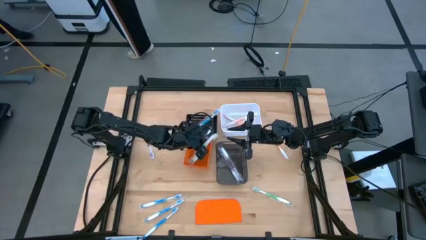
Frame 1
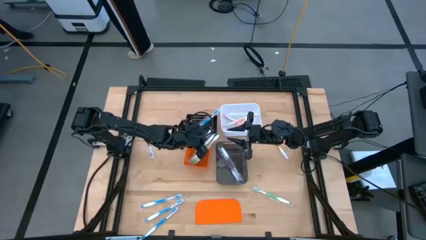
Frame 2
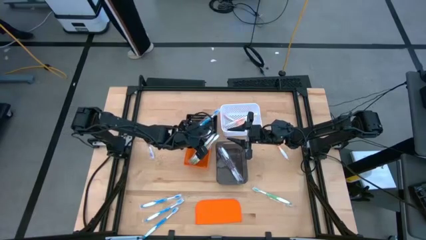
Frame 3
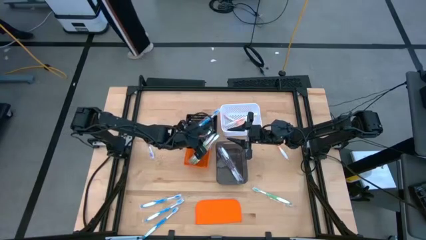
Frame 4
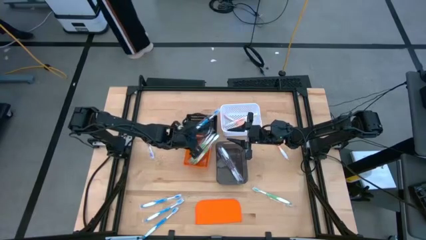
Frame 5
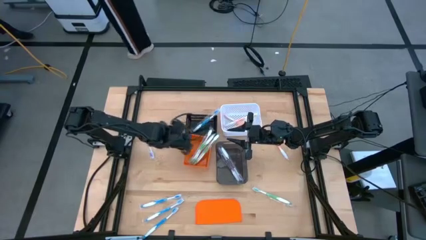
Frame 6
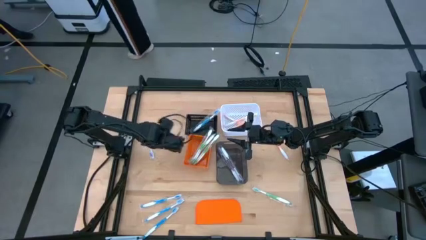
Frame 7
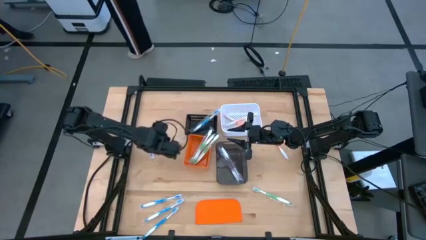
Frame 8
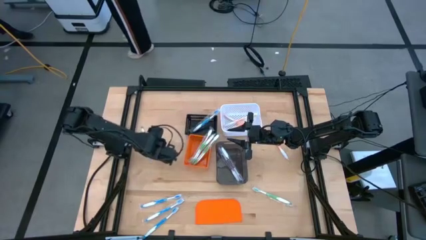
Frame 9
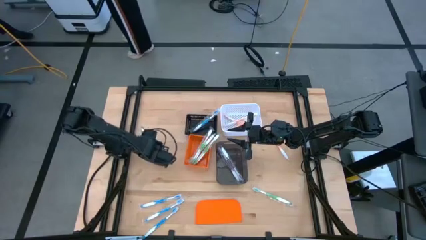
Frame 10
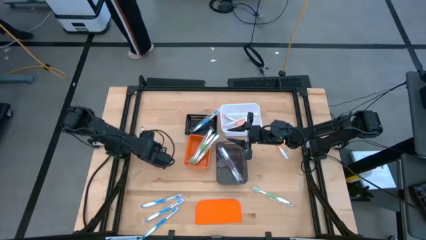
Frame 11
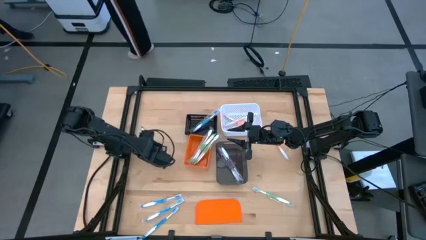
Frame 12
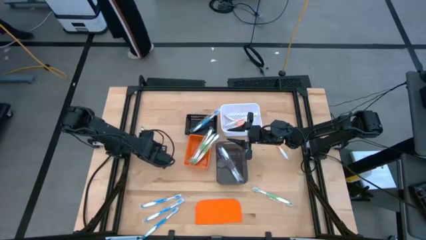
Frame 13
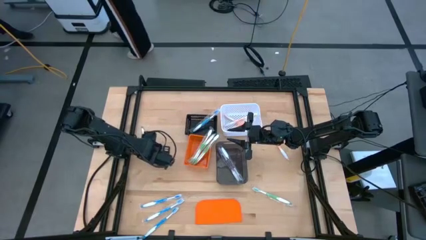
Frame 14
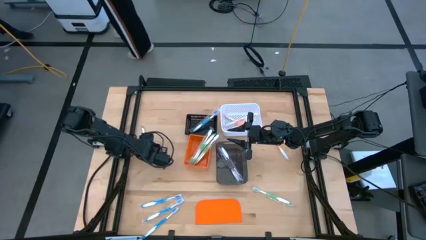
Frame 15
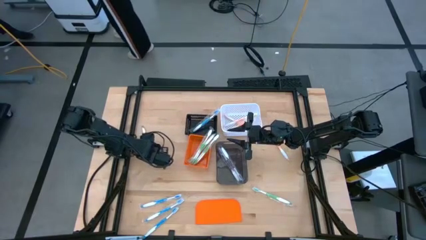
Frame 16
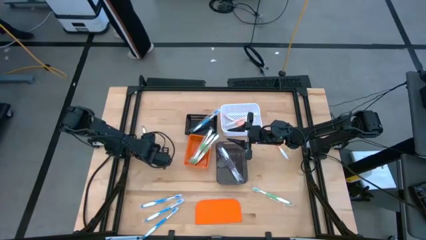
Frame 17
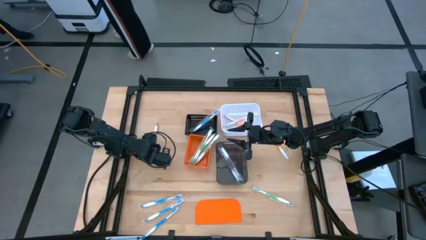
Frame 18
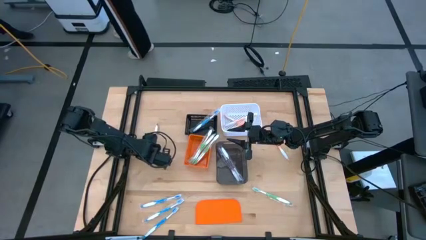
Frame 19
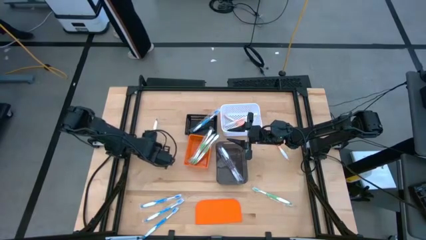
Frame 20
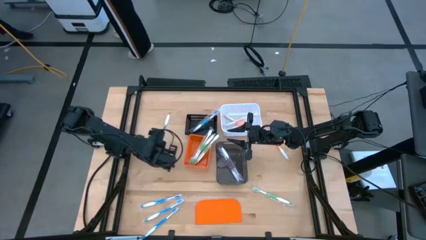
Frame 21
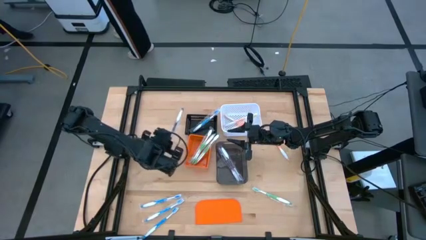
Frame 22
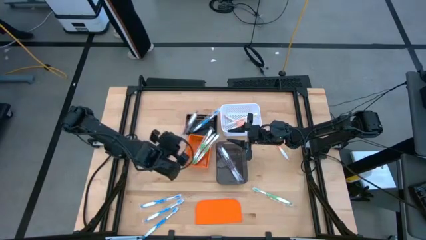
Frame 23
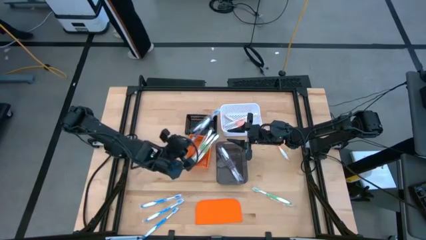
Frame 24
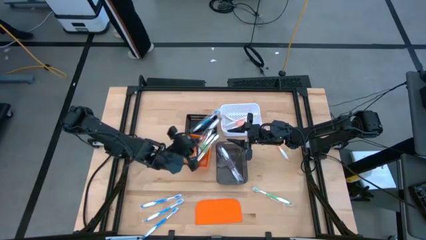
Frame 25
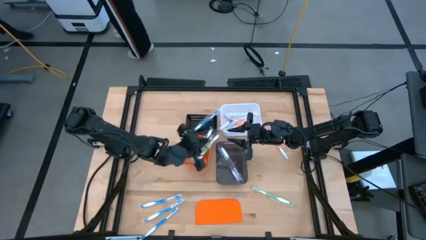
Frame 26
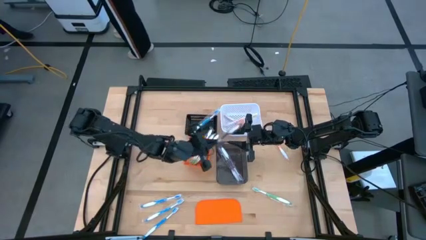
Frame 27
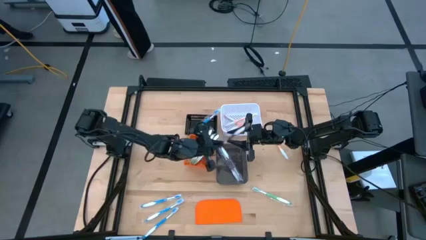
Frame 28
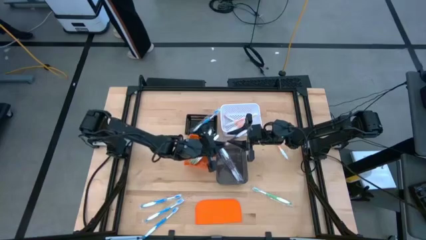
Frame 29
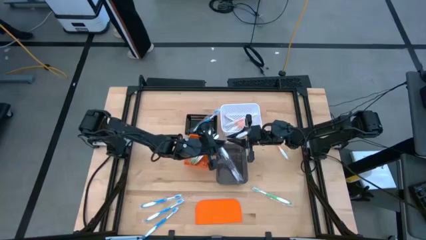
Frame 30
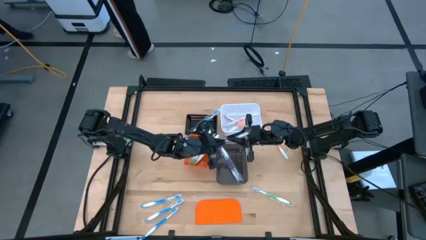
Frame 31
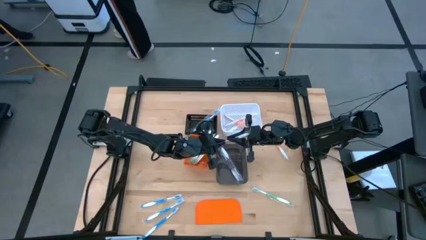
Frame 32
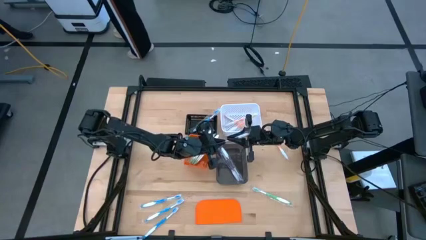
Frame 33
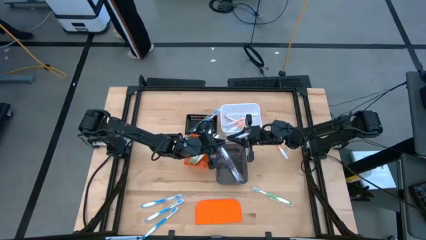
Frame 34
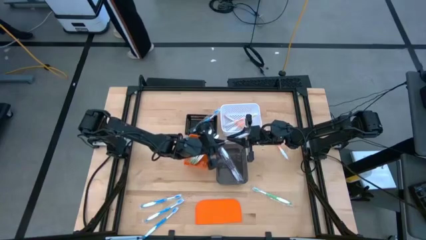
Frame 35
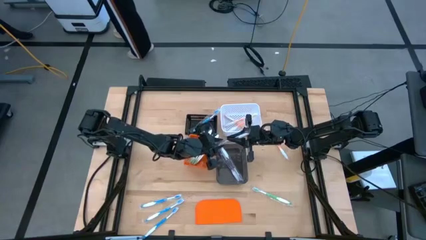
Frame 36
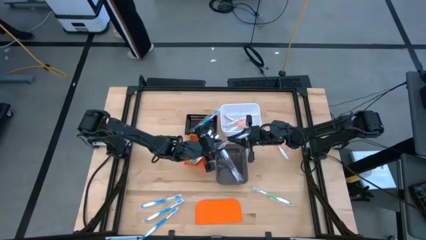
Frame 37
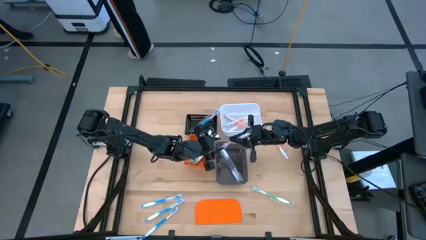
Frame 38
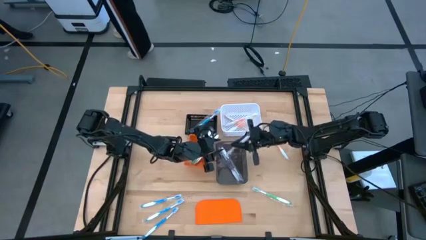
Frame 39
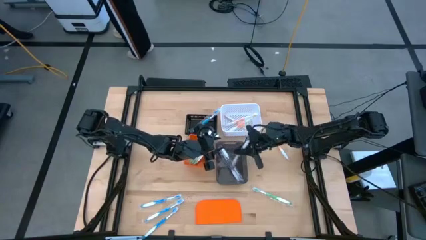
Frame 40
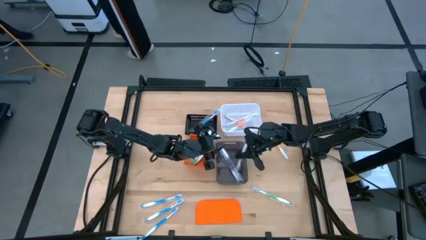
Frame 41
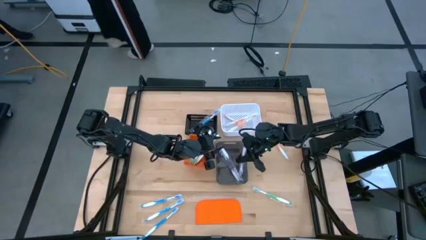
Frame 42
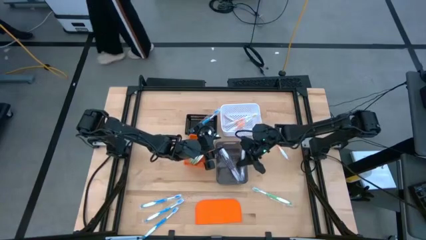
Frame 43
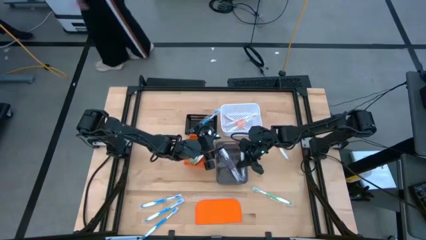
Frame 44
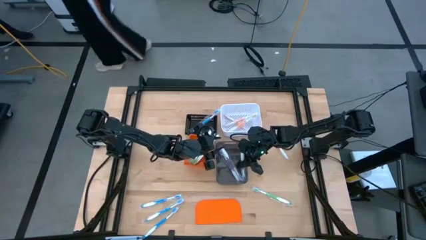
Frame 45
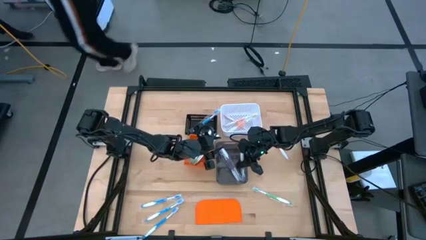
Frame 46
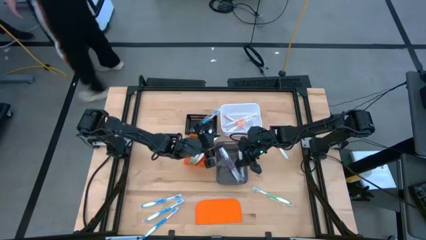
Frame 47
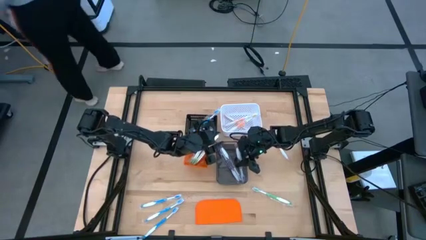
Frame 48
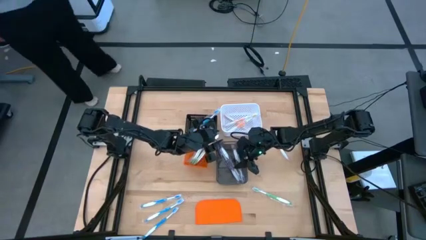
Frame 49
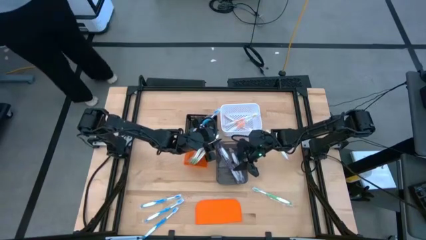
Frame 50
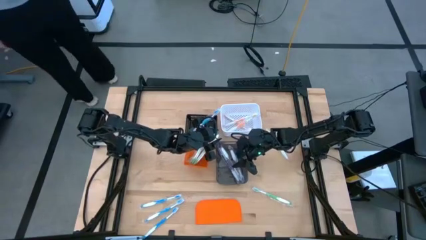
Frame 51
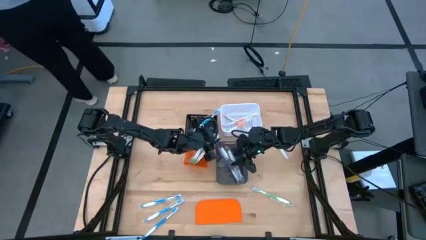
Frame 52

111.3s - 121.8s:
Task: Pick & Place Toothbrushes
Put the violet toothbrush into the transparent bin

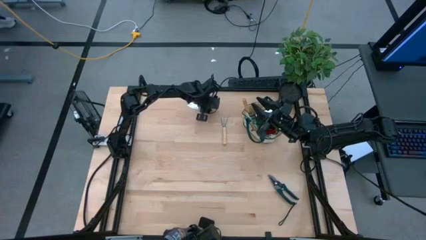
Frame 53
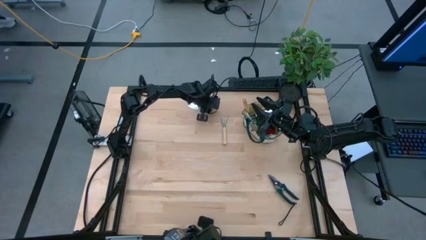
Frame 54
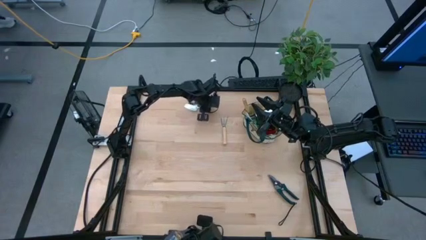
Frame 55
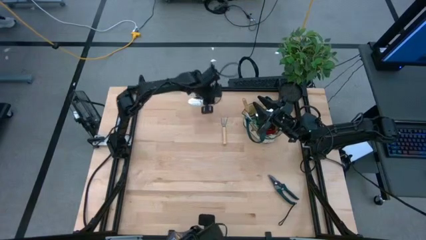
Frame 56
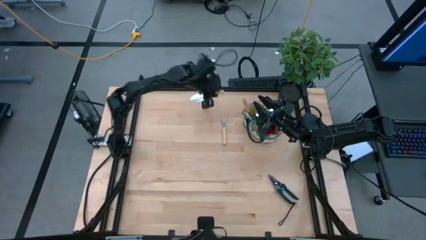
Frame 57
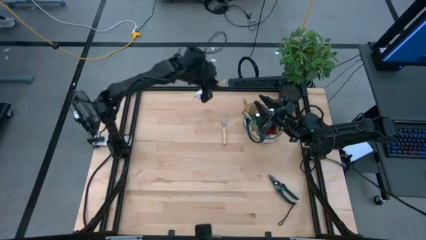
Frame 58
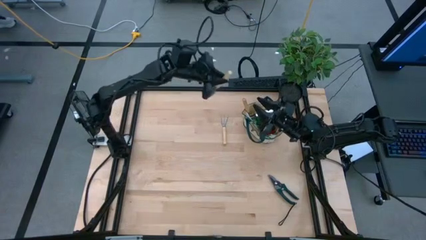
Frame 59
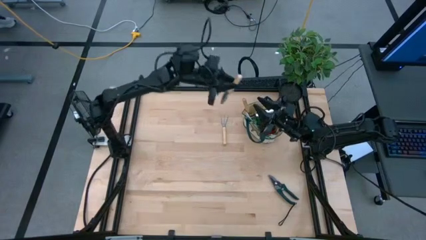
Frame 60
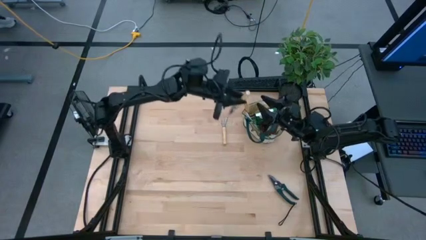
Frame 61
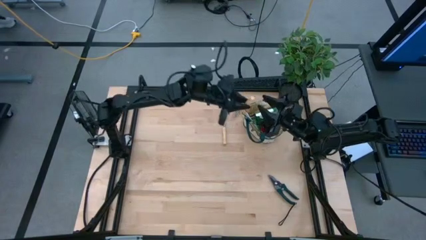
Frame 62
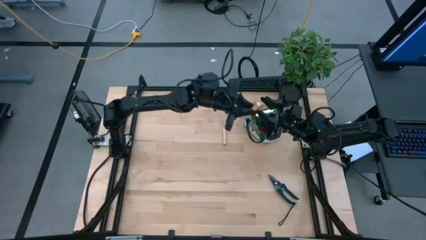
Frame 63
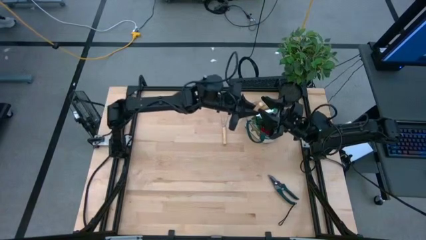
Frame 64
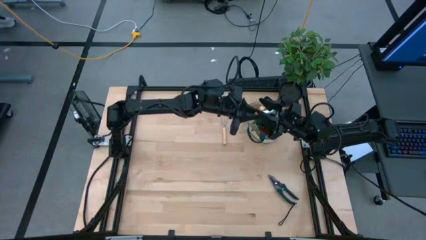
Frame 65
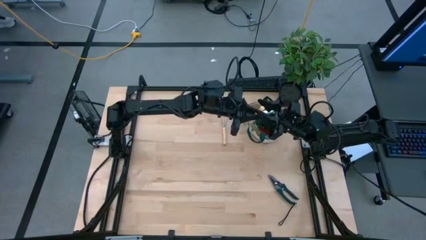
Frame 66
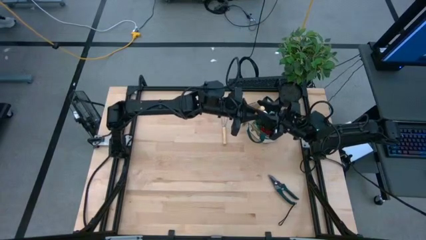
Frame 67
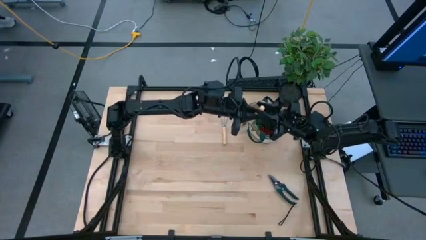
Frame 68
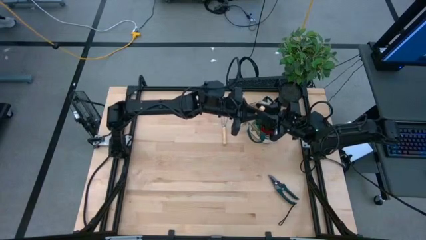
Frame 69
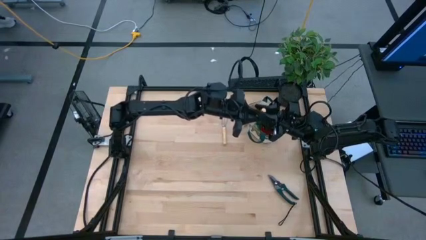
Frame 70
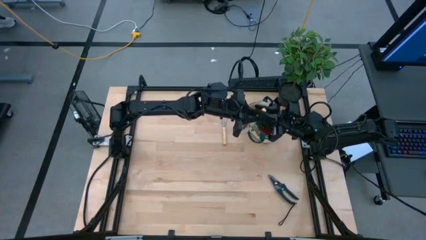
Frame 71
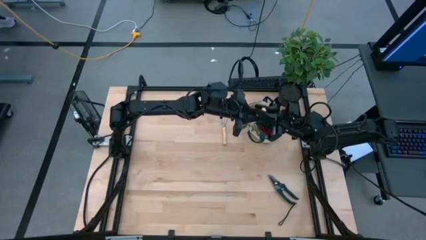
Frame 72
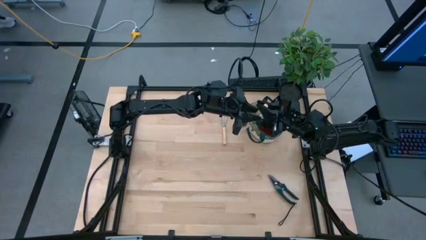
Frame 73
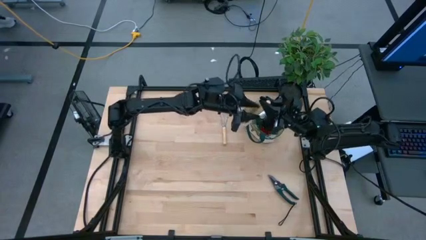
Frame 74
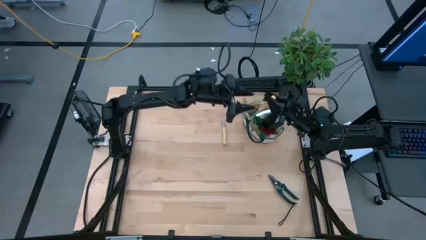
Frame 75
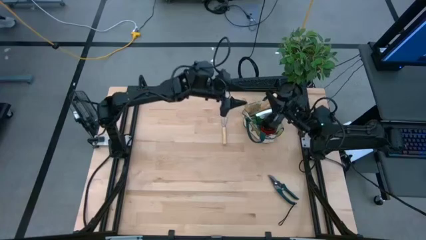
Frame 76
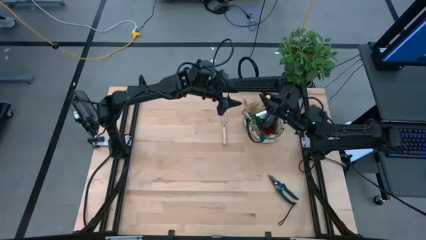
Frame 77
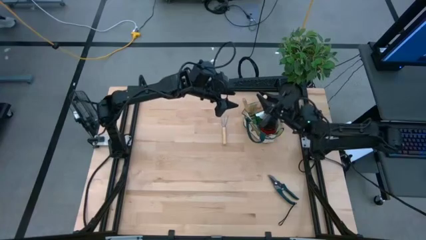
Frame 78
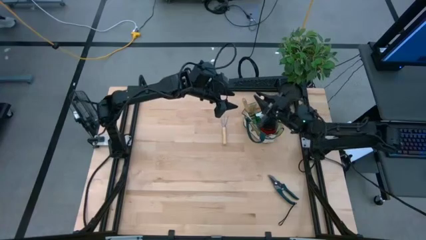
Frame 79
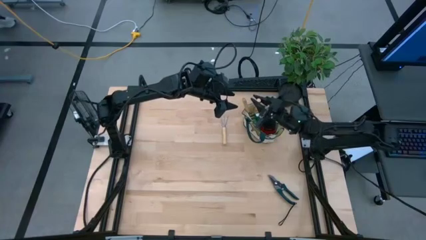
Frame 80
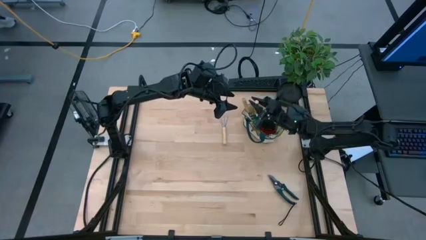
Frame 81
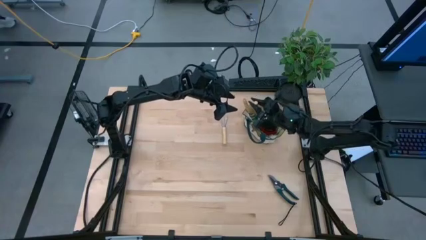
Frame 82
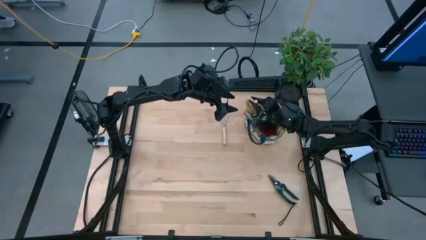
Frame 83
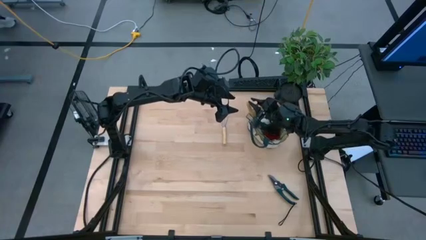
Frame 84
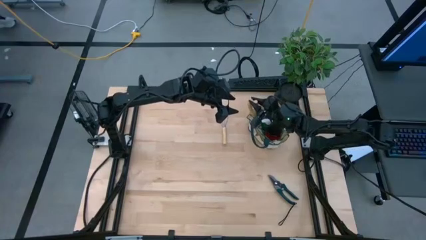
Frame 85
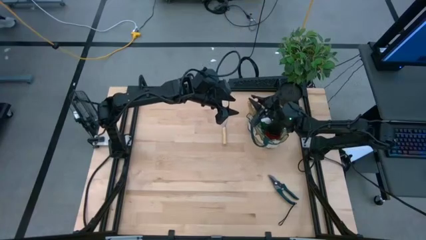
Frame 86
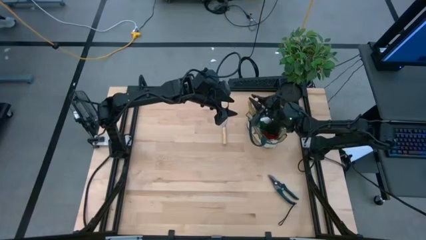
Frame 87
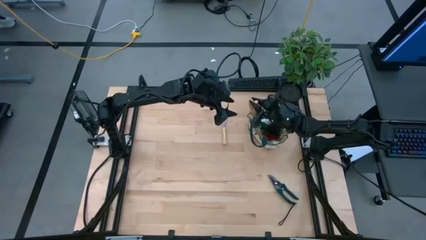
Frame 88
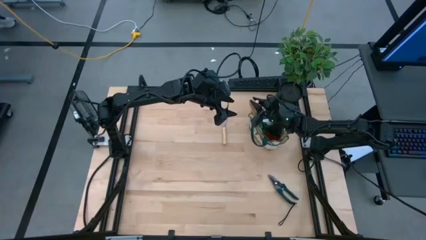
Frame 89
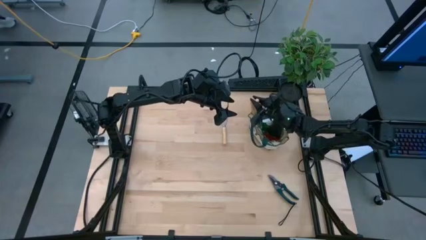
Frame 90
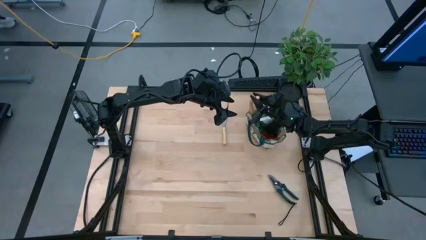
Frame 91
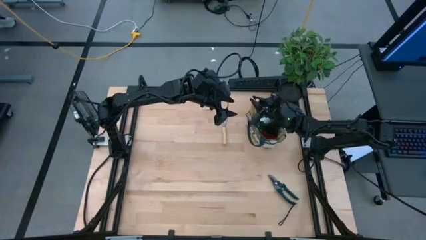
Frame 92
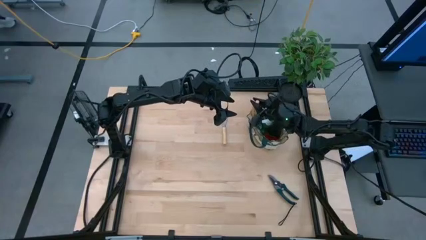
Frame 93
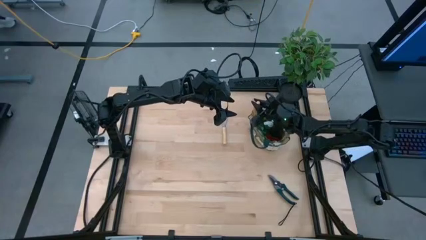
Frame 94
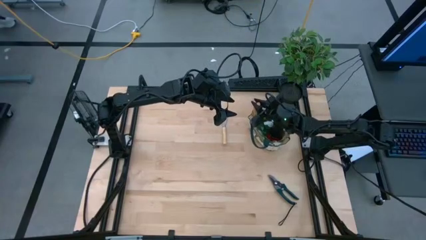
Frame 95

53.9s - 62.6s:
Task: Pick & Place Garden tools in Gardening bag
Put the brown trowel into the gardening bag
